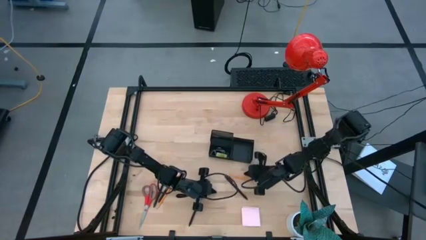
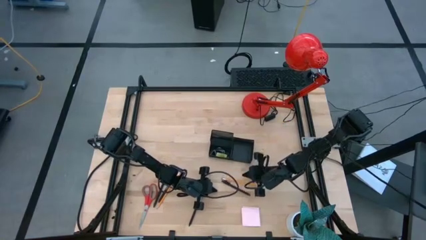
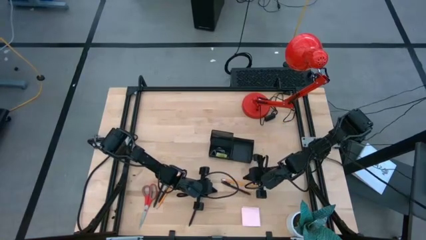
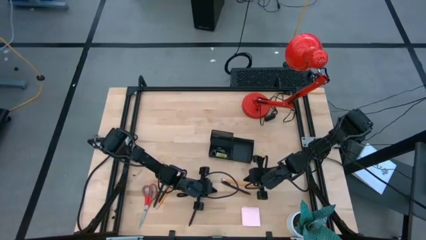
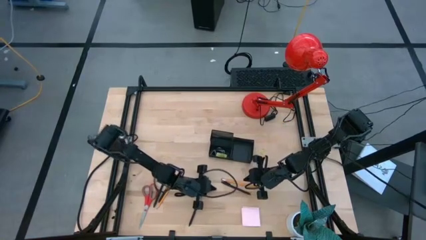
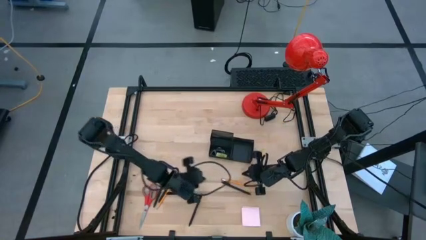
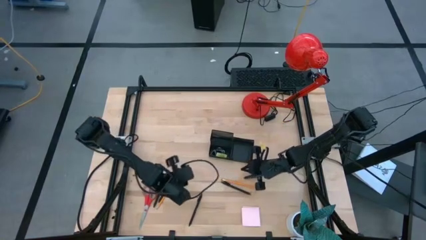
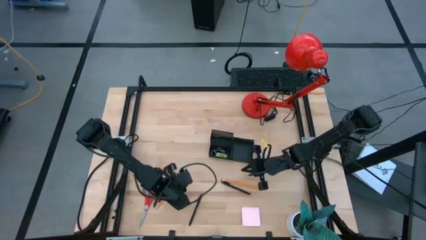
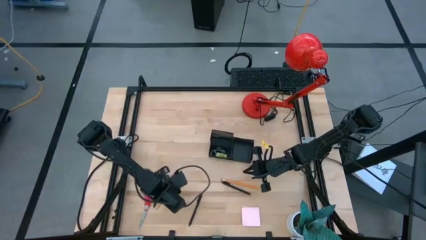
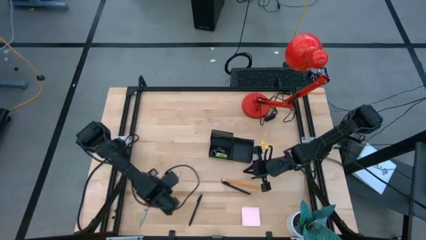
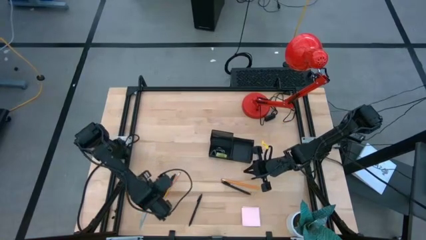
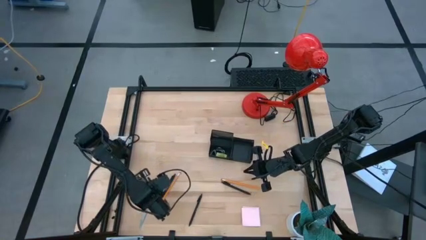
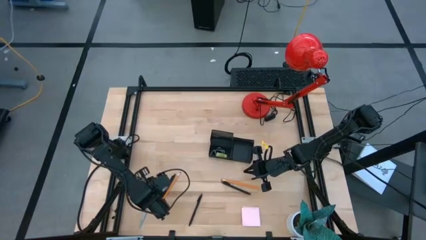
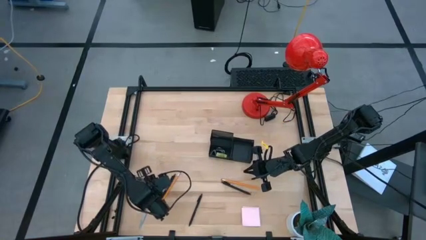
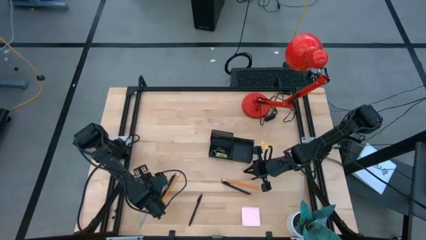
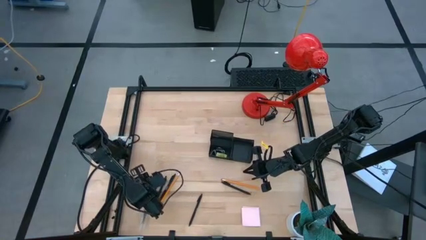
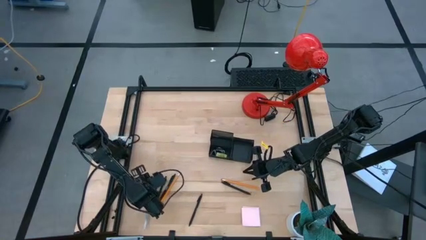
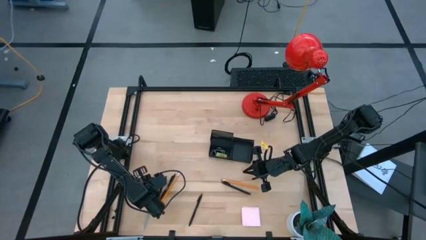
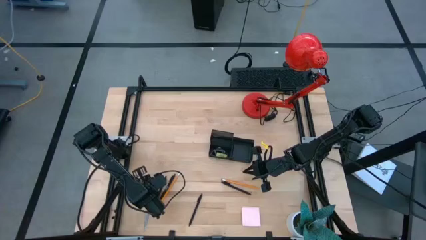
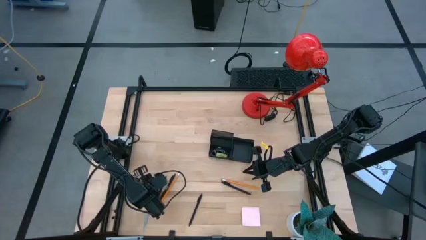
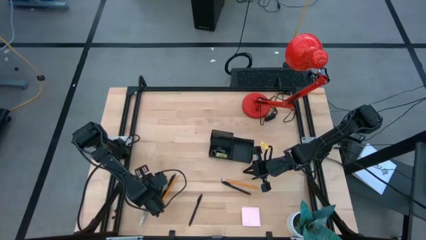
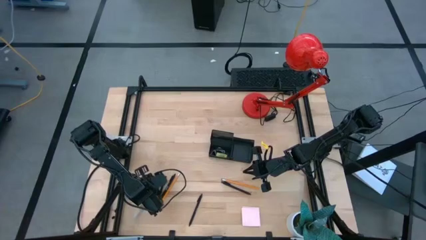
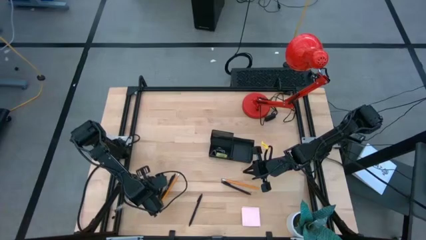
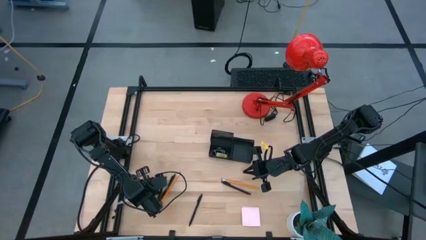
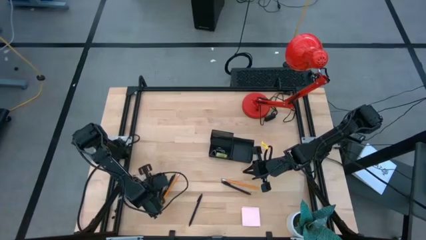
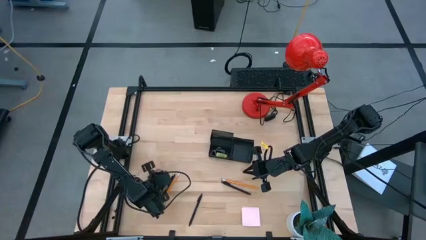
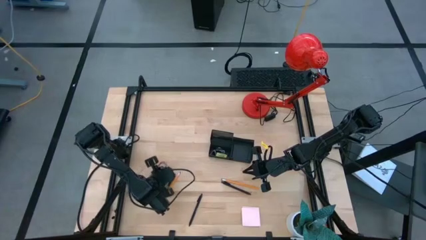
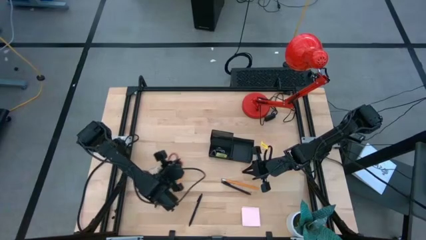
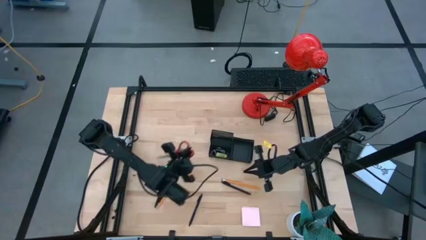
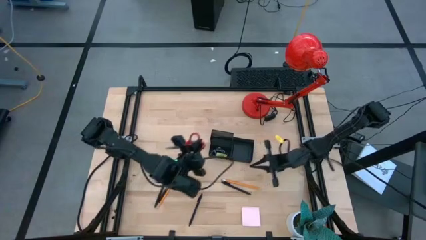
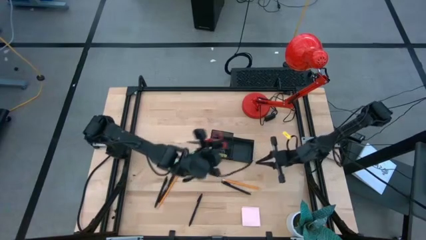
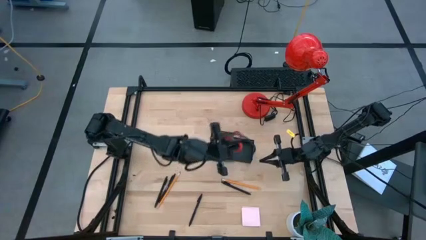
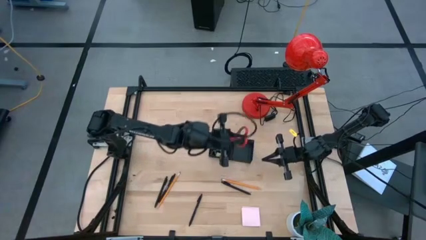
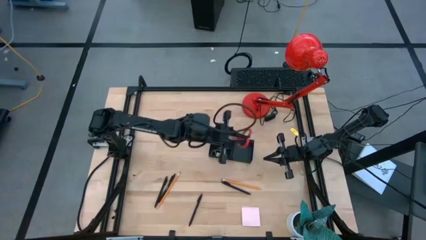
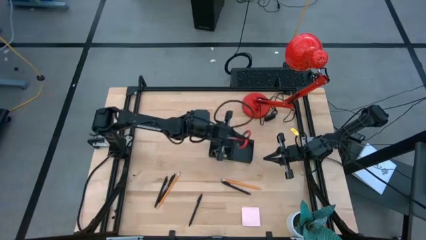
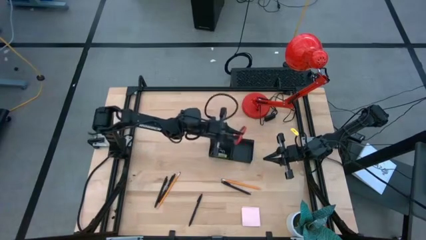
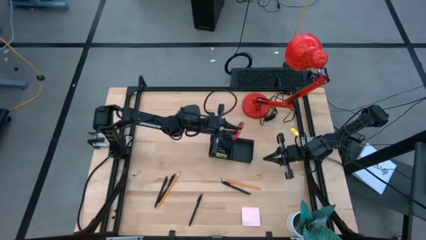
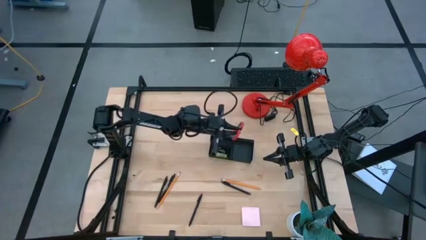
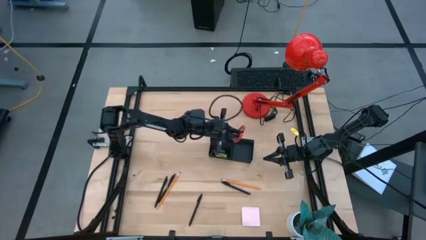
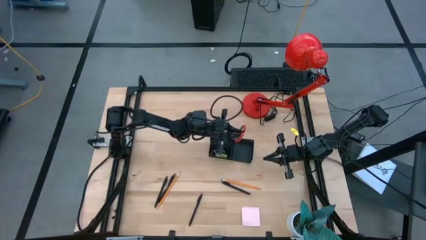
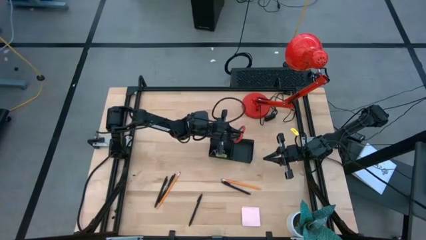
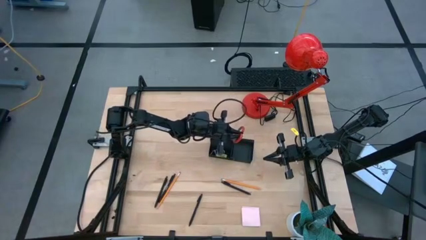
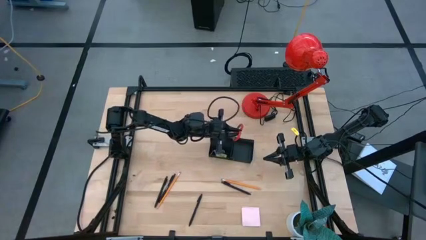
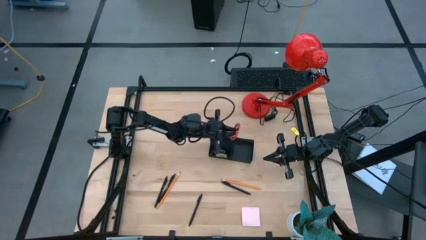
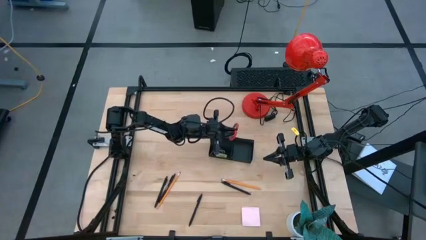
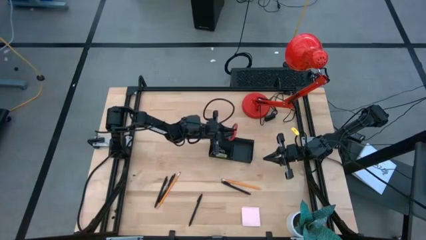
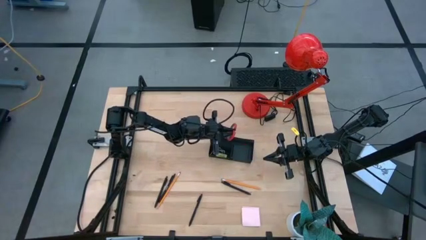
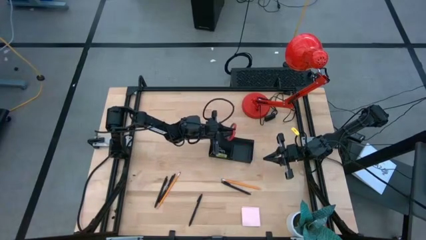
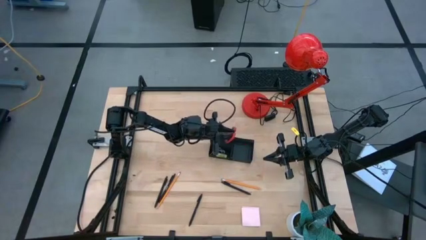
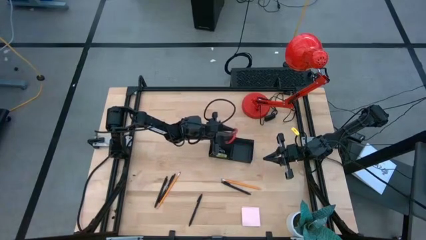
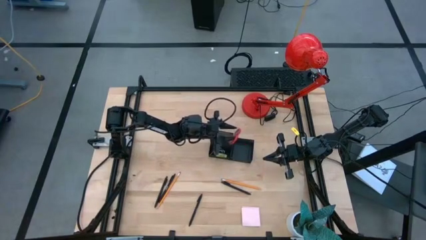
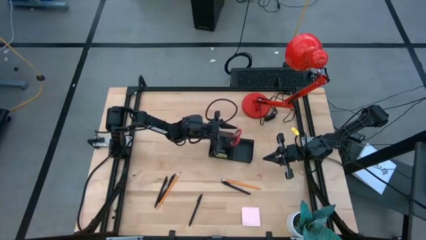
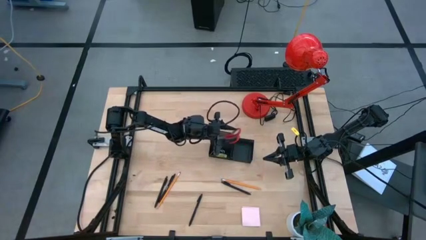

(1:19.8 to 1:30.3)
Task: Pick and place office supplies into organizer
Put the red scissors into the black desk organizer

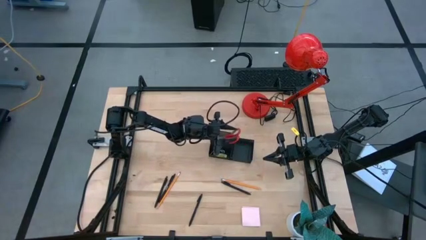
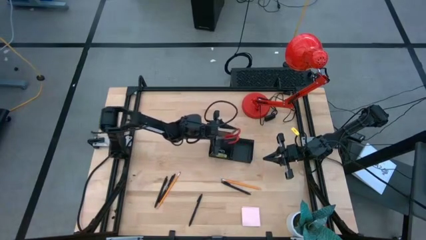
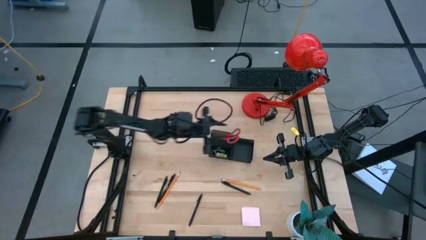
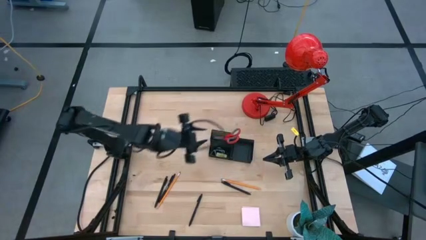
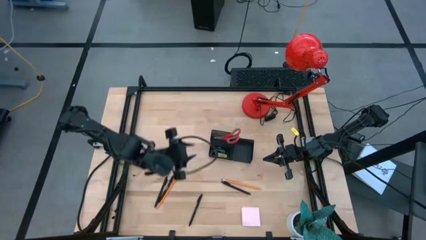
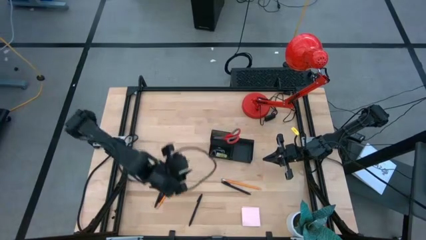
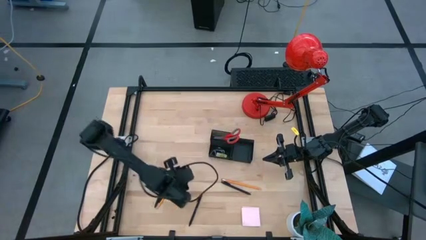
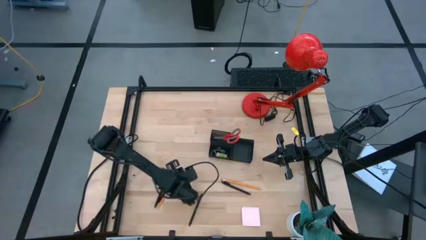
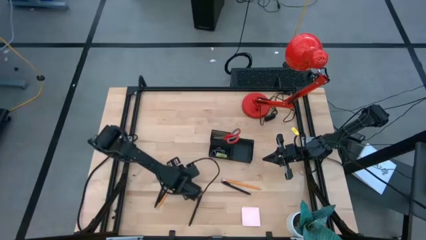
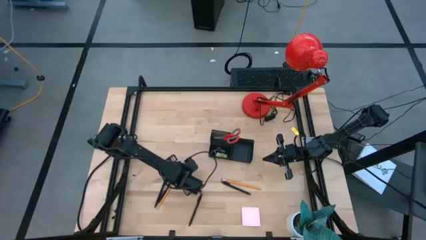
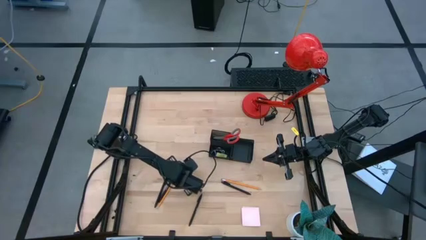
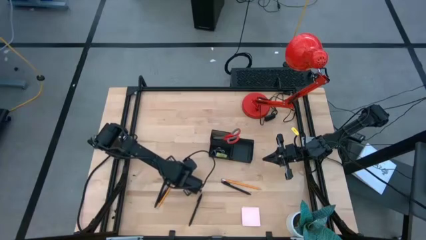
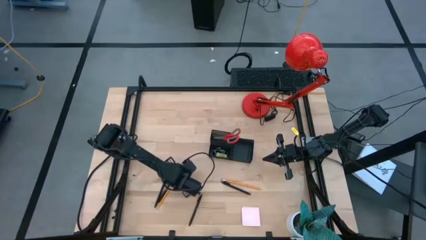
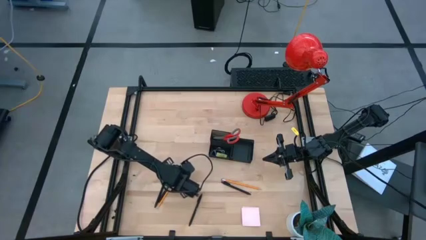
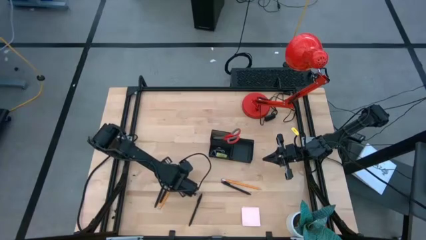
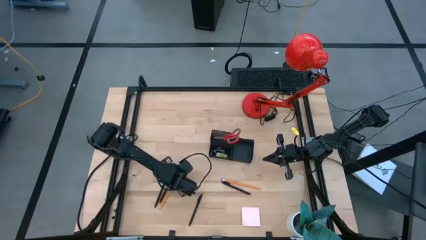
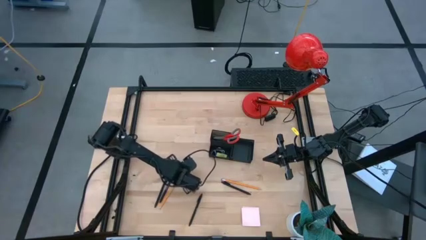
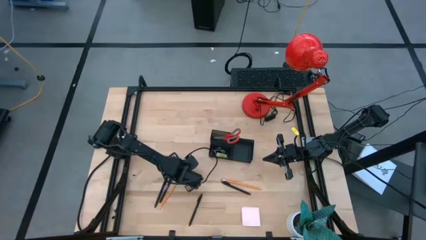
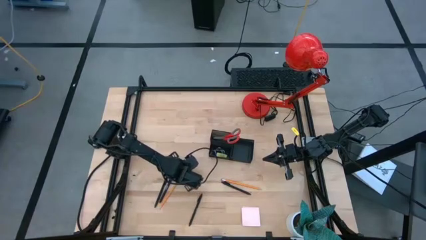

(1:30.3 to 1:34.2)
Put the yellow pencil into the black desk organizer
